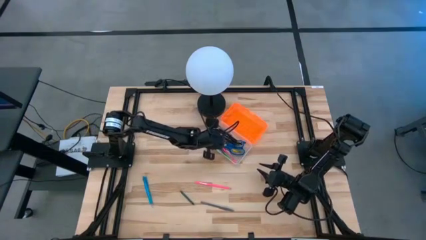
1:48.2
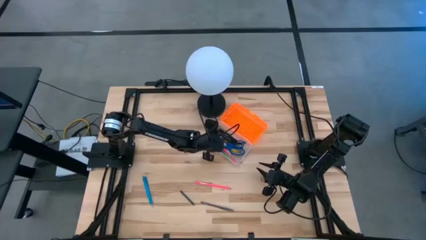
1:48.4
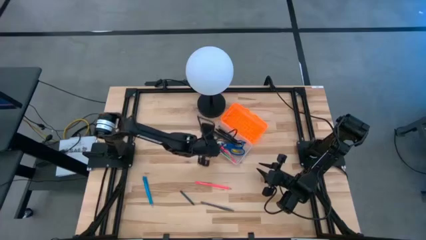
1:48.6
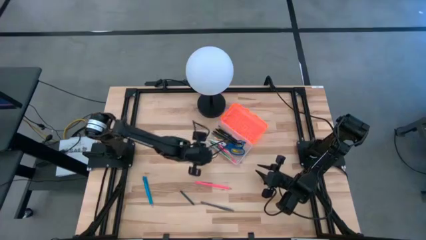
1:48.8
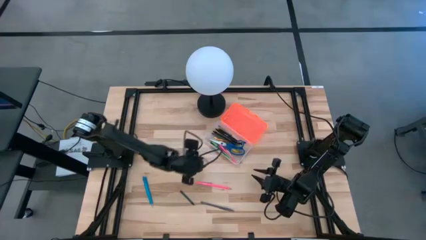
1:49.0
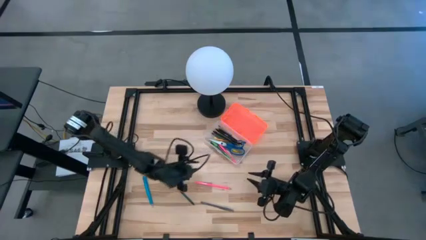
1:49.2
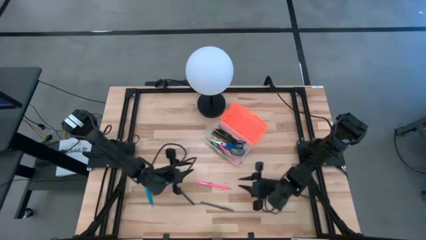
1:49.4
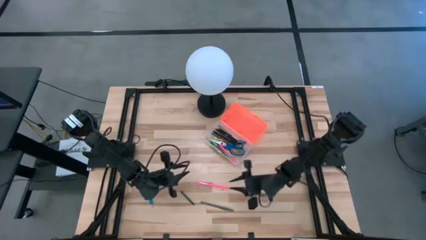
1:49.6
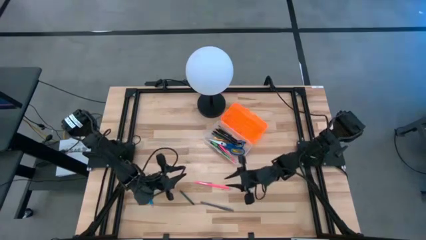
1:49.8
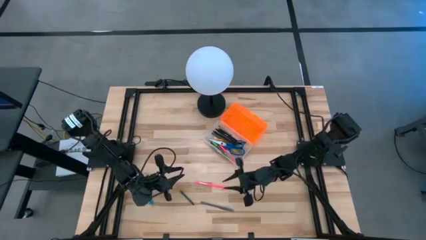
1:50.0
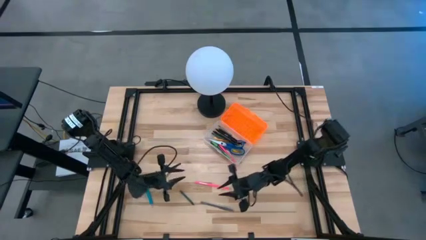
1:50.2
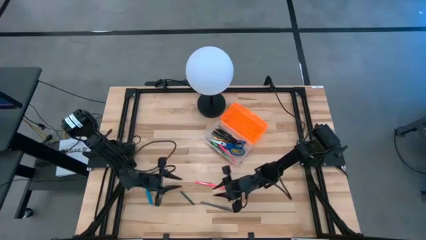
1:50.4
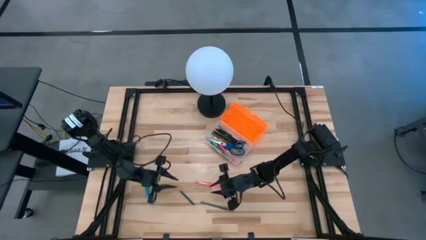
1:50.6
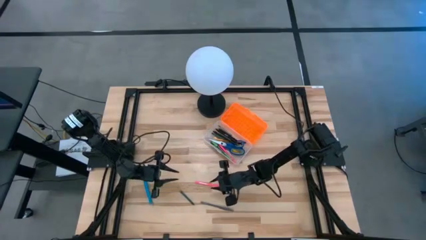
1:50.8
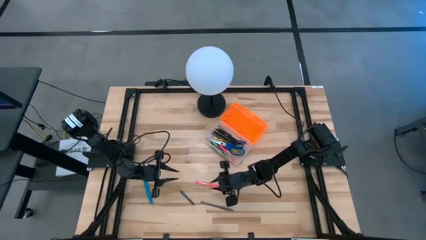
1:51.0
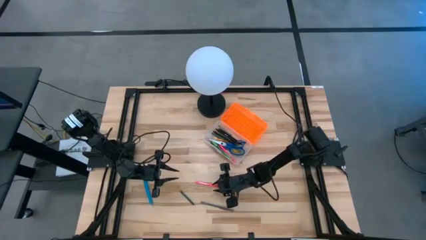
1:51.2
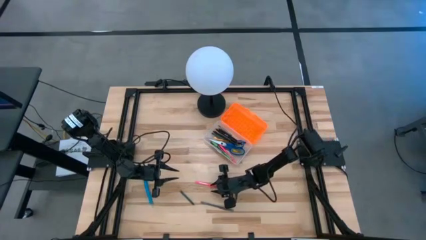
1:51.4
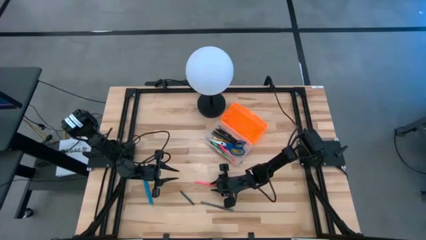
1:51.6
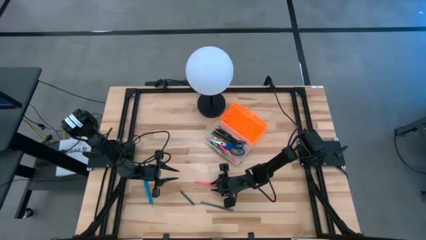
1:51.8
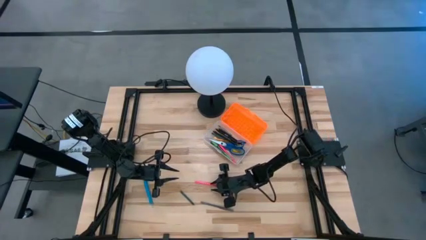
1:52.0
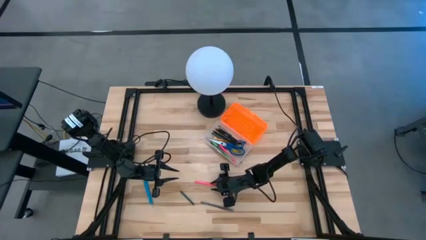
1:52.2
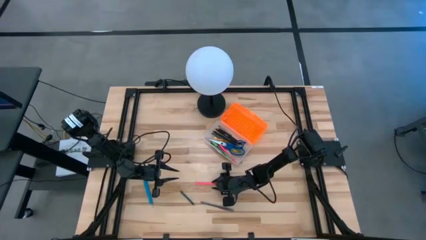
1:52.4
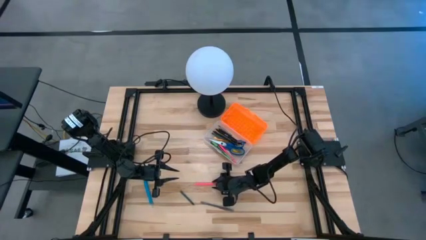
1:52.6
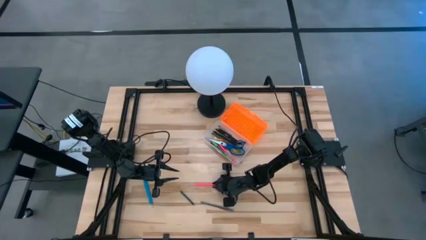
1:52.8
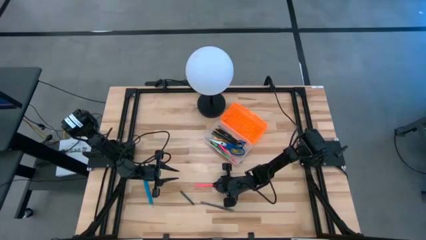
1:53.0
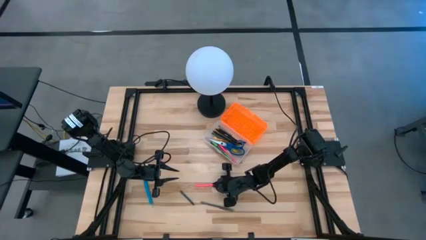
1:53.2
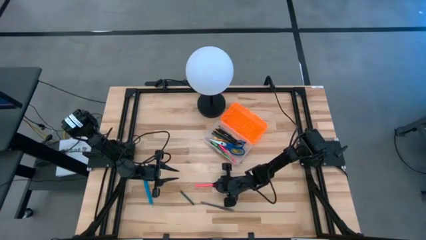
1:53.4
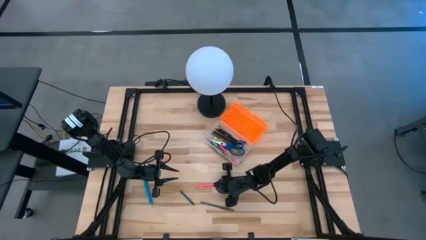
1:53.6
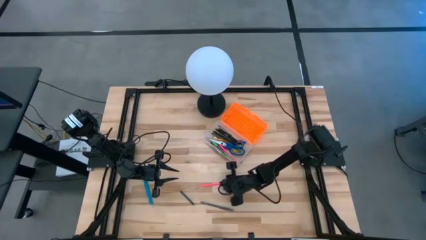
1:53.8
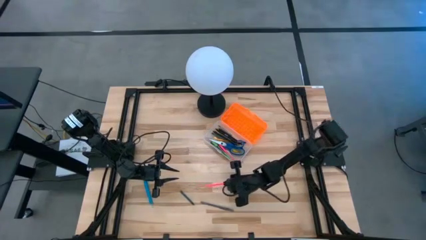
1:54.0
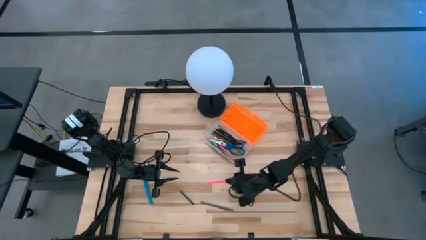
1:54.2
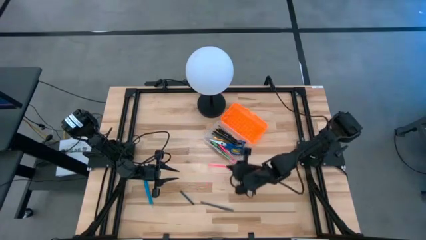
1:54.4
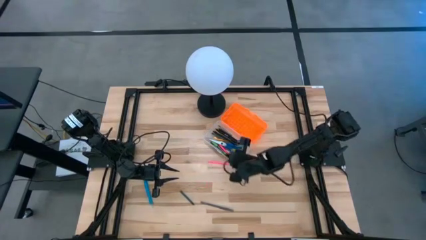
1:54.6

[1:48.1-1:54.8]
Task: Pick & place school supplies into a supply box
Put the pink pen into the orange supply box

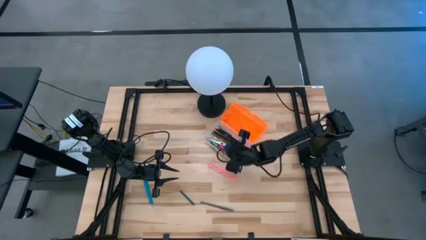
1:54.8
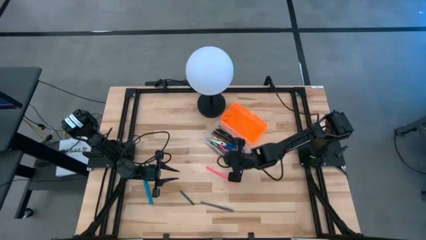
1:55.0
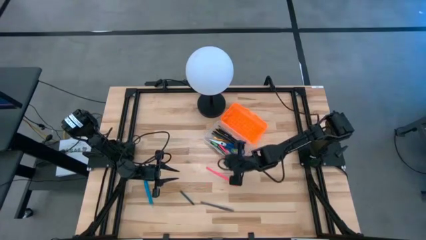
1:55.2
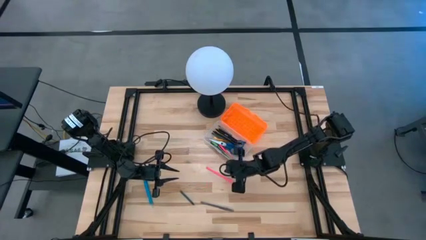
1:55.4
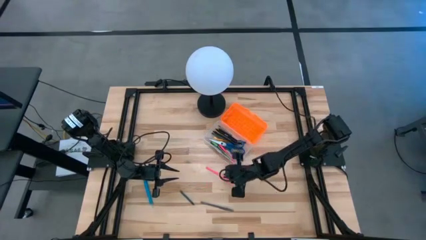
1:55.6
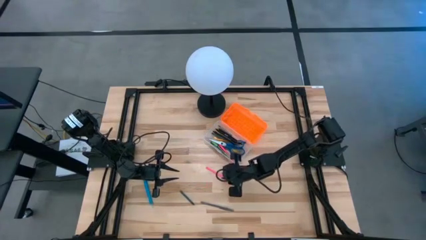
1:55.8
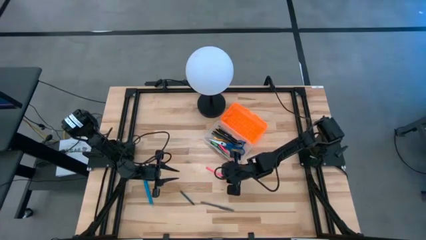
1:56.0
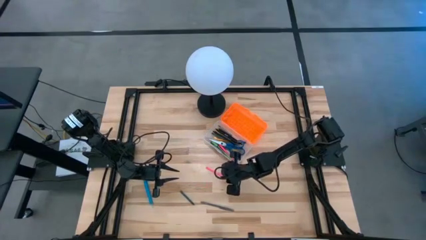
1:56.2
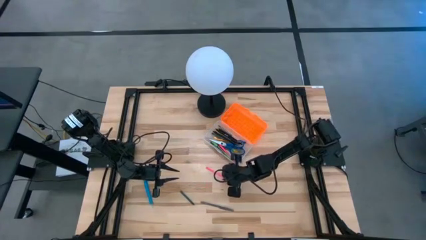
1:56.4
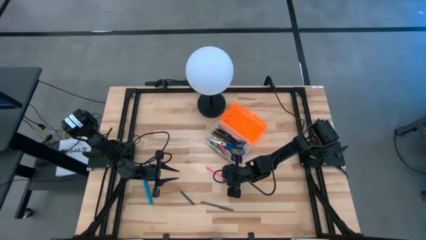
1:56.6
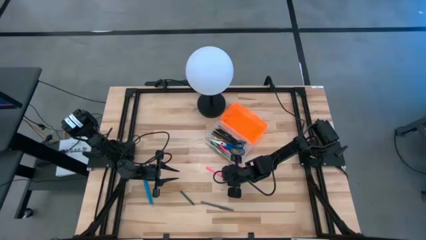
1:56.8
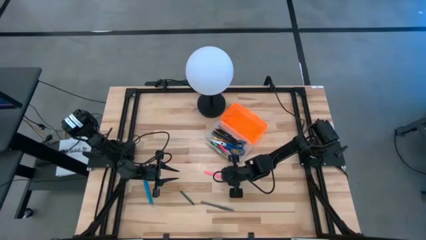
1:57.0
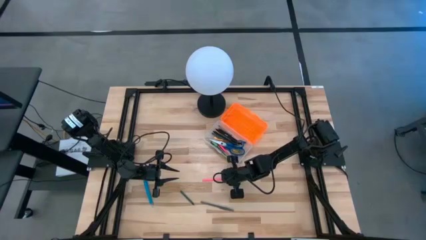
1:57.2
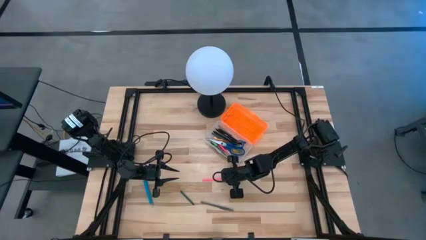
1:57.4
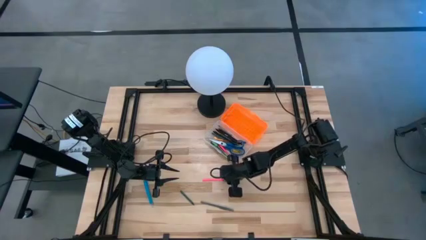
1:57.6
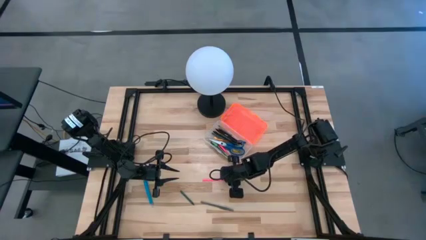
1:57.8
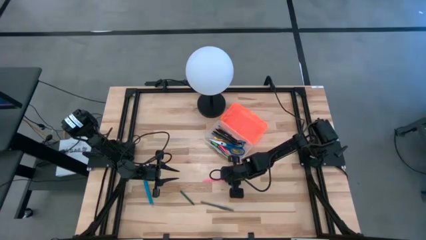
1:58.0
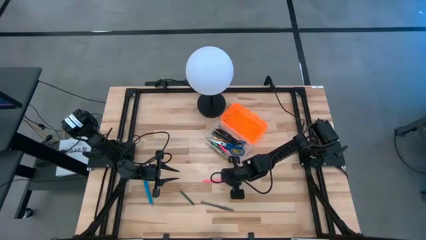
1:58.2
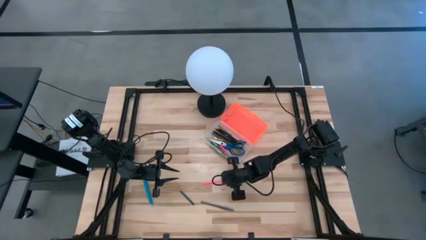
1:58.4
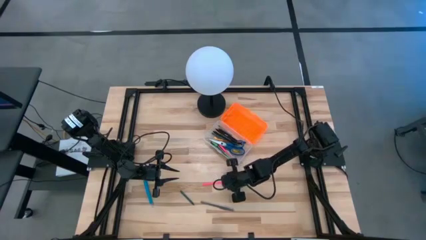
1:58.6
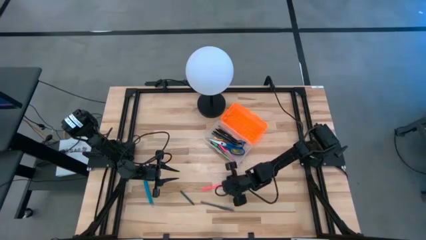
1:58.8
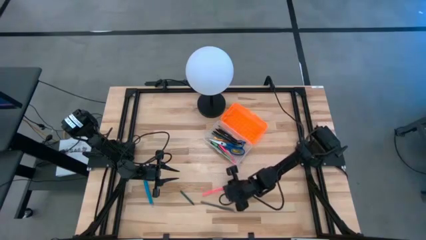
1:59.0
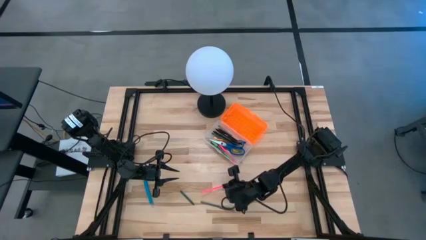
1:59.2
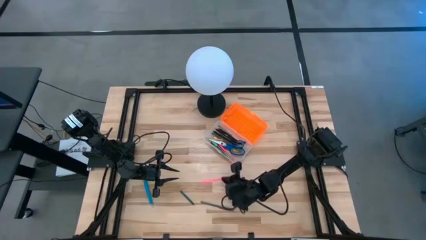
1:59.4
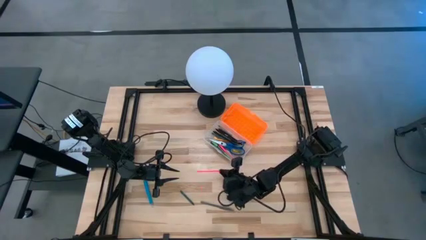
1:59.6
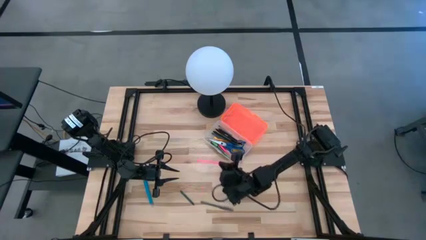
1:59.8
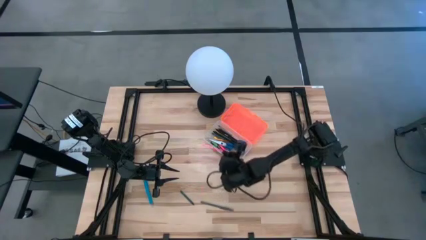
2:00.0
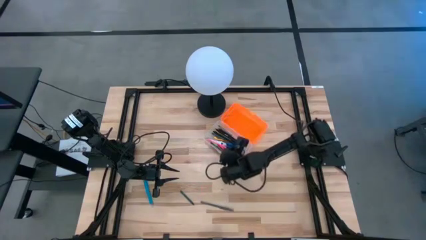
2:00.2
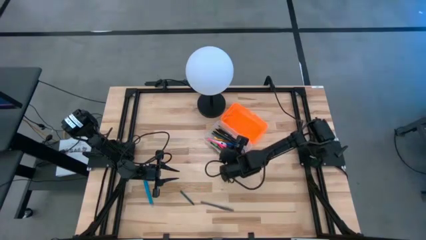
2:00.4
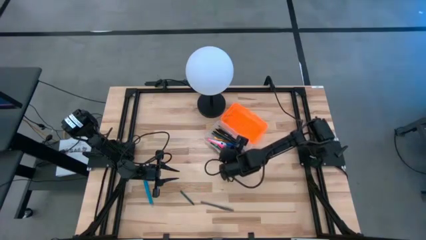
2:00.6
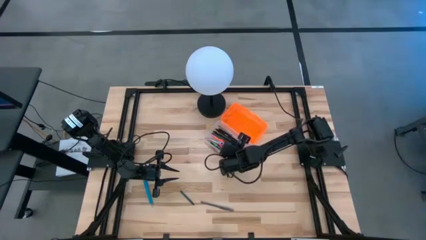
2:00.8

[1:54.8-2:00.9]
Put the pink pen into the orange supply box

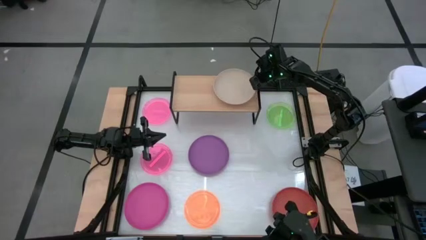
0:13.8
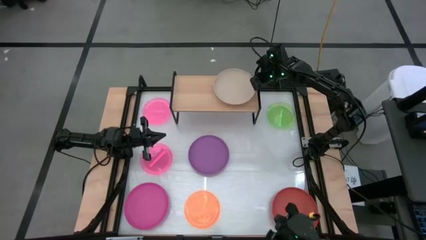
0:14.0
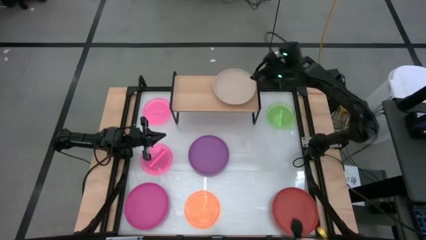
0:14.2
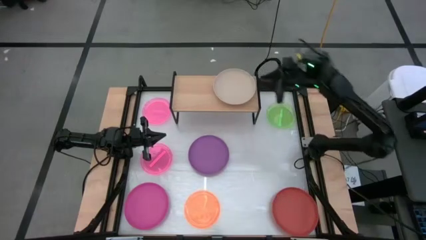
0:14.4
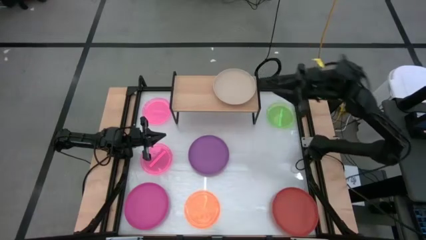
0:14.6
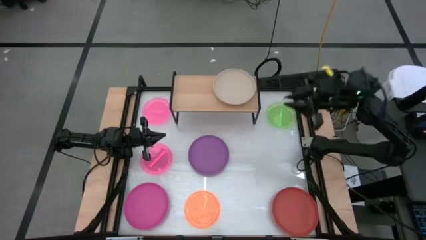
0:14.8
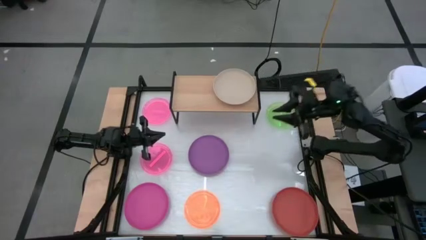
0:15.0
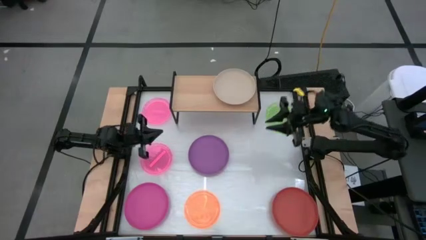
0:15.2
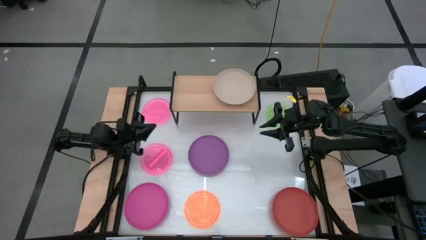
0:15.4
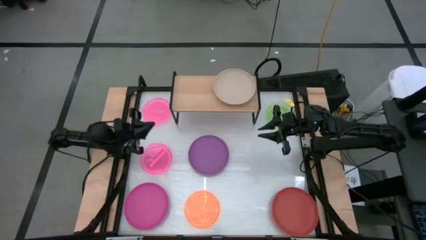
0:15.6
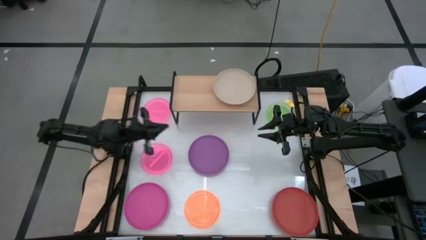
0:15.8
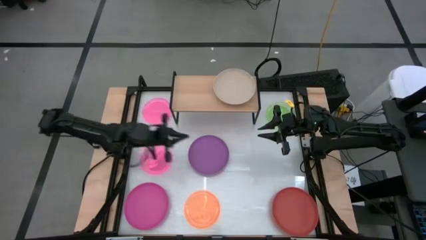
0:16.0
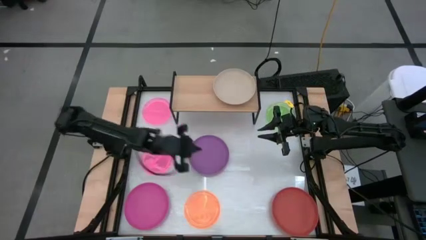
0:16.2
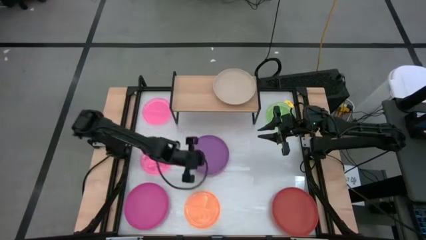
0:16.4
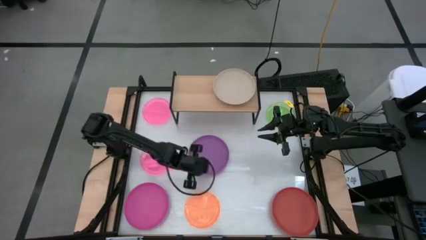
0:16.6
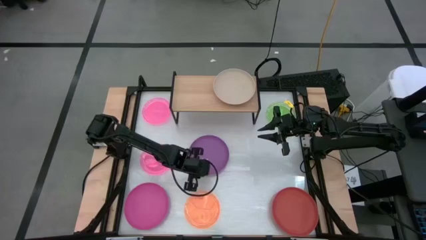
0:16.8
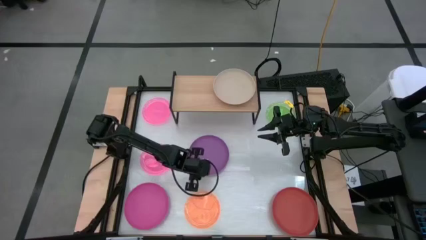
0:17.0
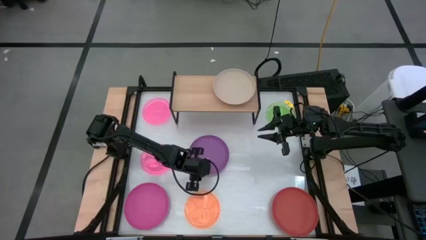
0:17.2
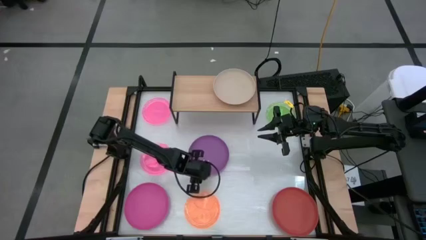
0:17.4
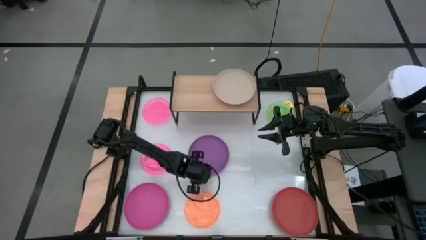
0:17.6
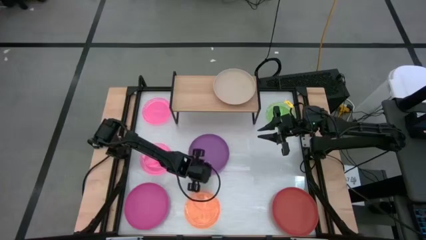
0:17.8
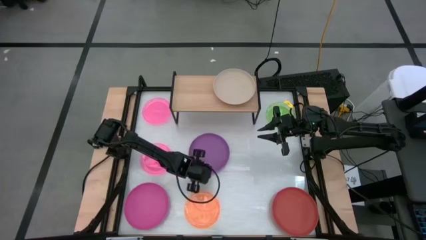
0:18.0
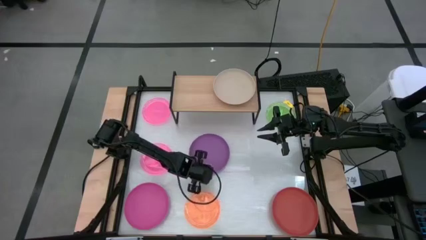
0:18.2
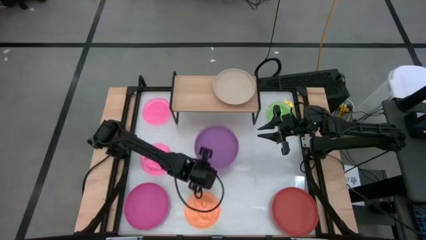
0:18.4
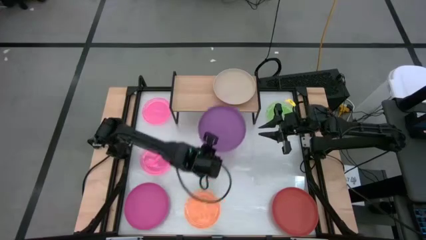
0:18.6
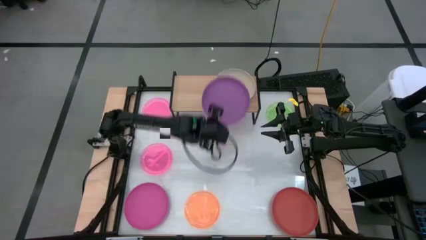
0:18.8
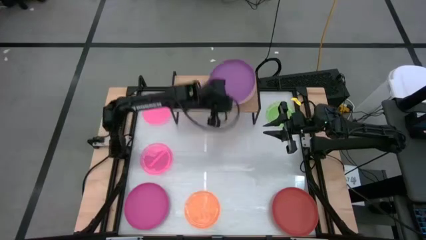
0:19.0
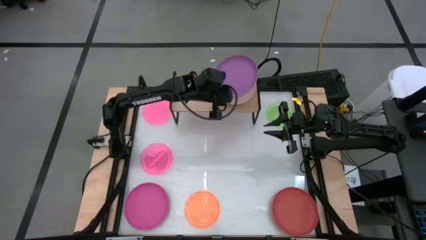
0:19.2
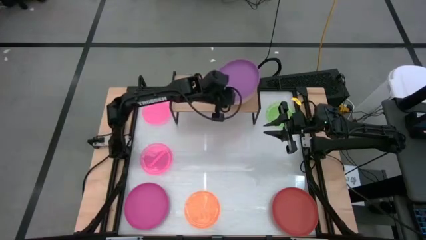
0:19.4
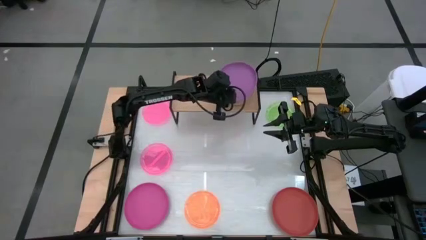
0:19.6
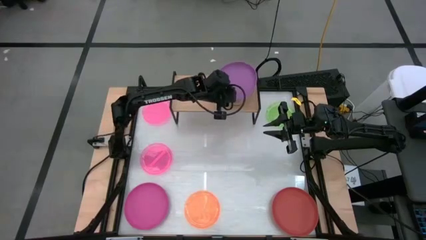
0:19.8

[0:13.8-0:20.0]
Task: Place and stack plates onto a shelf
Stack the violet plate on top of the brown plate on the shelf
